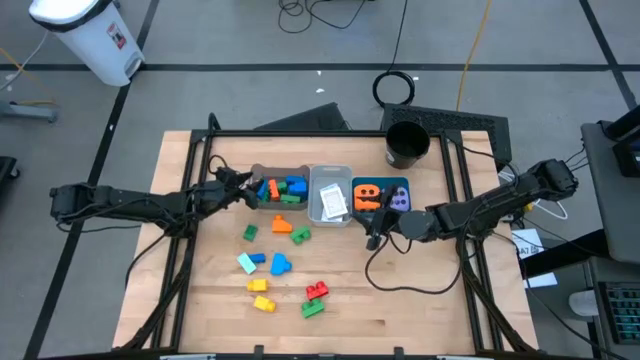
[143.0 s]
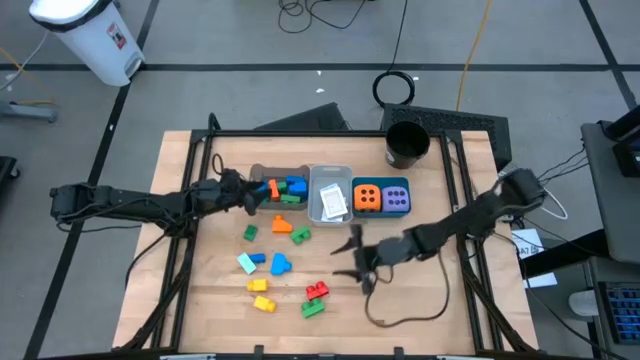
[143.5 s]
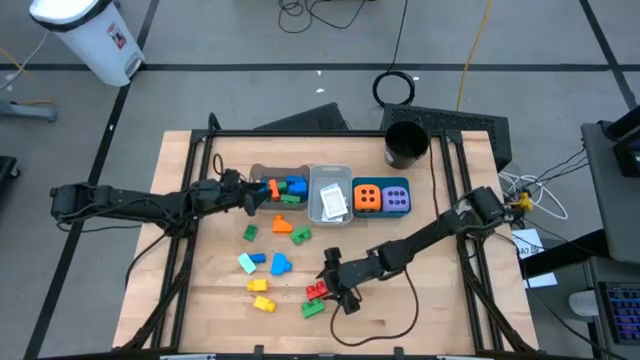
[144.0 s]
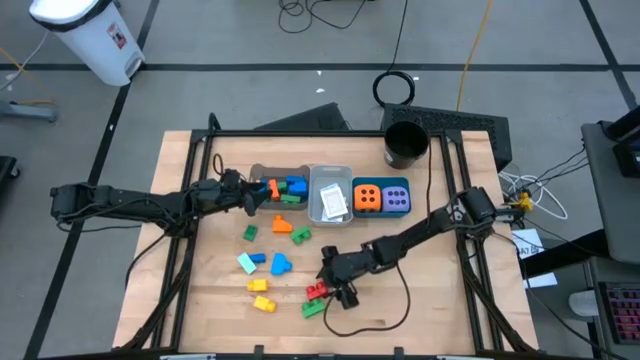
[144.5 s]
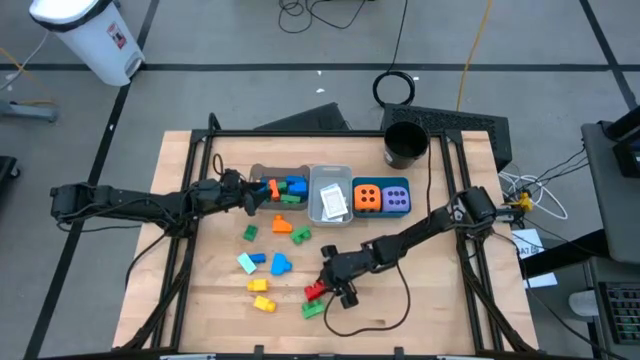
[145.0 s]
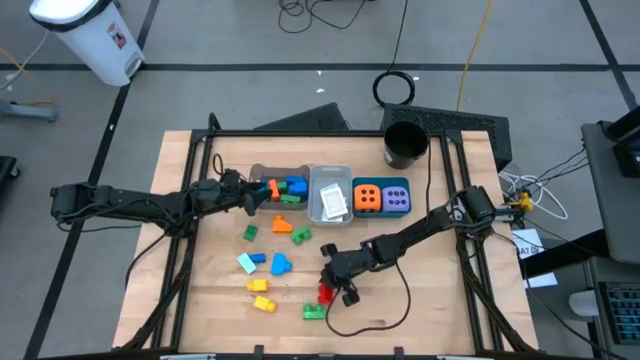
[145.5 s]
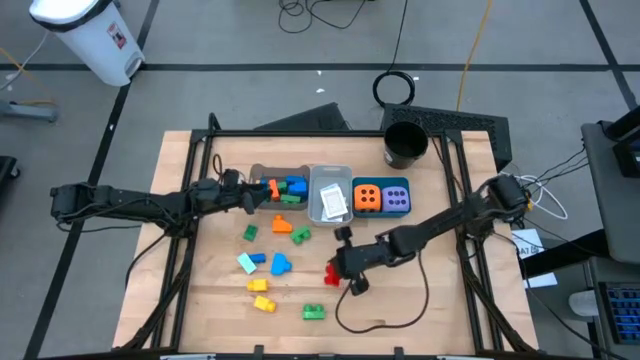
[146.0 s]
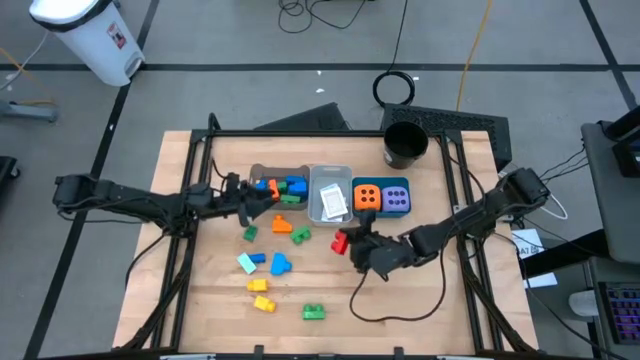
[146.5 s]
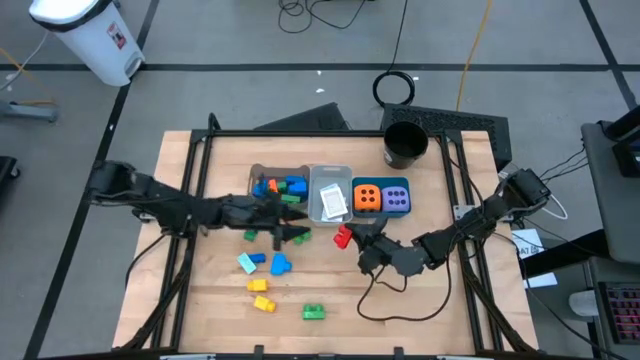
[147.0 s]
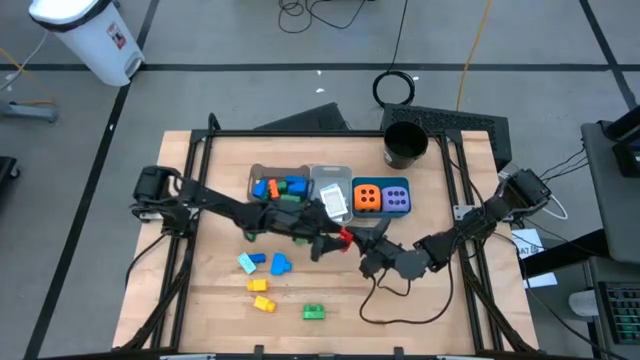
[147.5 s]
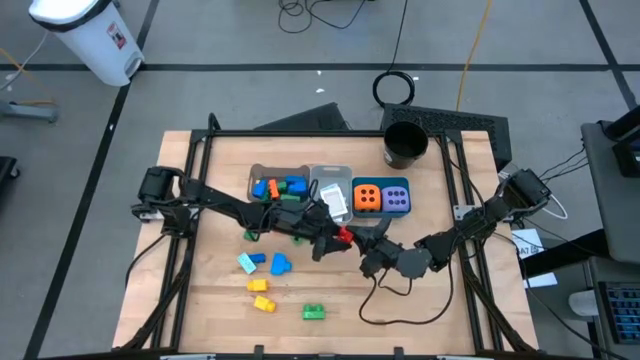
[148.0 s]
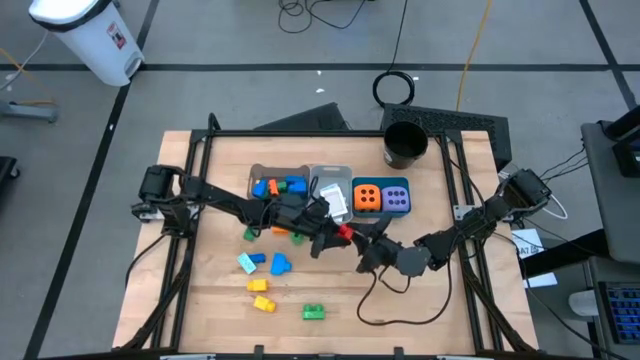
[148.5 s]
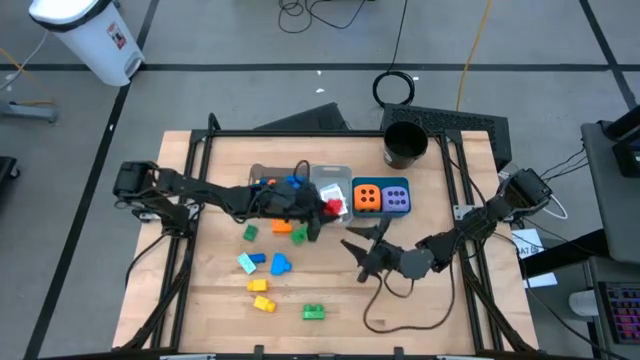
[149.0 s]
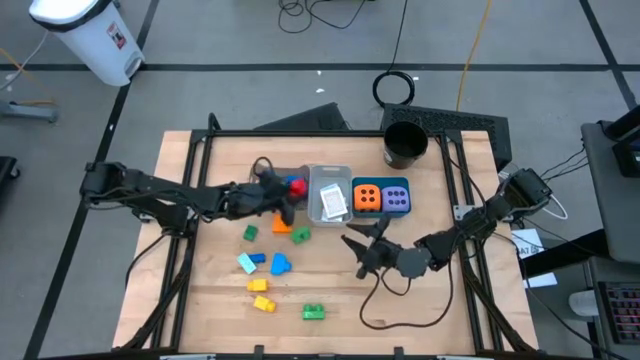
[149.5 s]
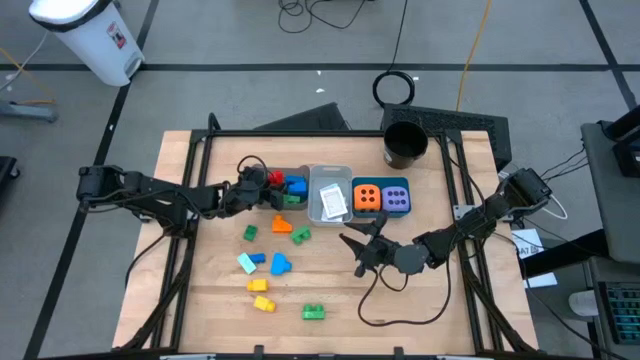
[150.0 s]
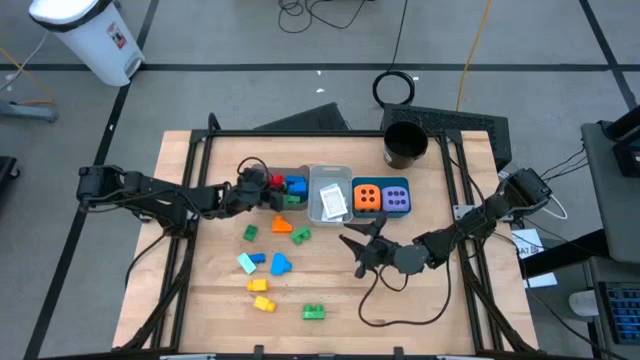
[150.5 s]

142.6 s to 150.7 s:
Task: Pick & Place Toys
Put the red game piece into the black bin

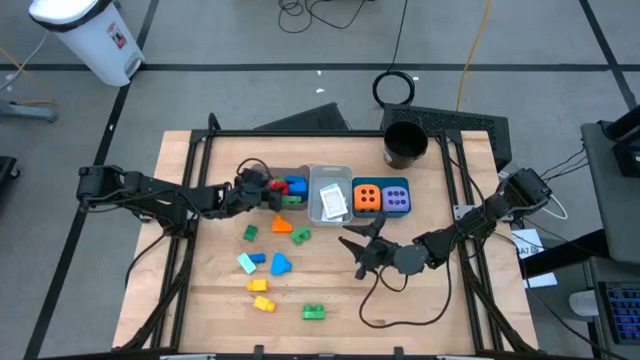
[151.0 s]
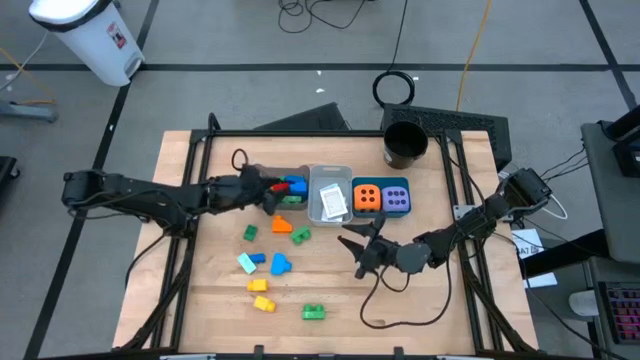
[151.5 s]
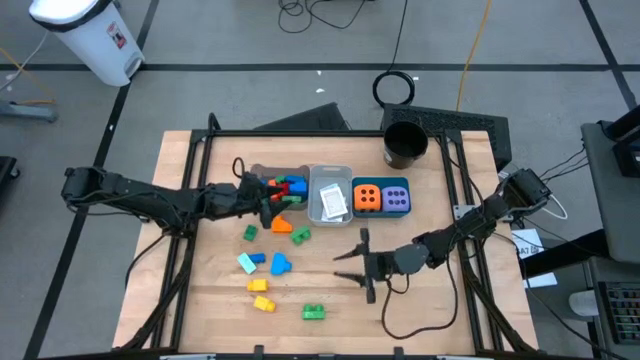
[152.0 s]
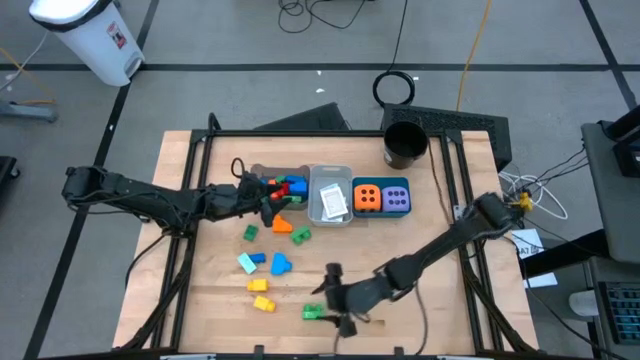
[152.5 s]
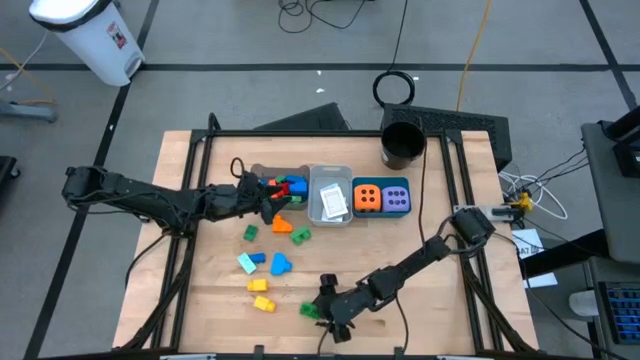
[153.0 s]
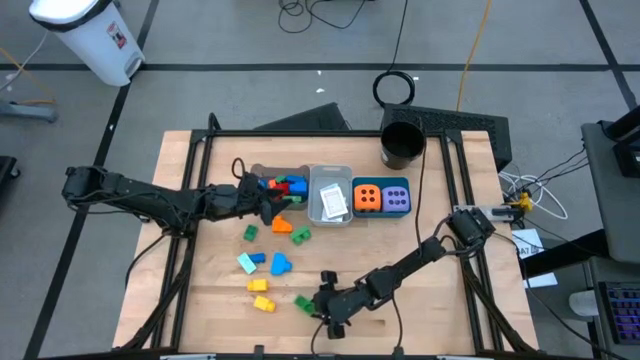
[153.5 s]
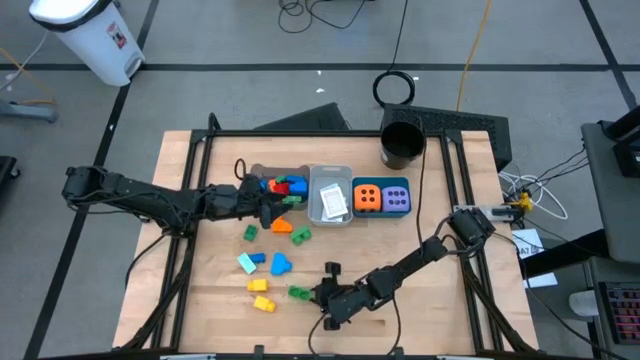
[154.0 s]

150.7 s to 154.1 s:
Put the green game piece into the black bin

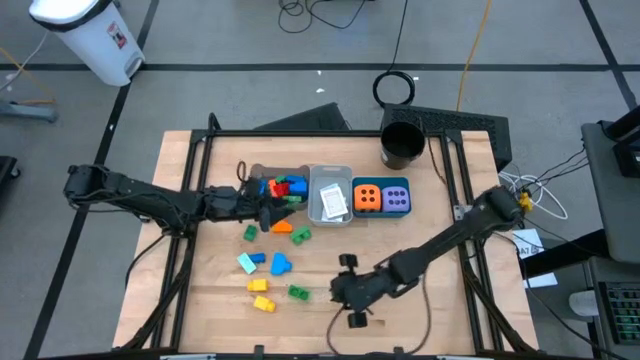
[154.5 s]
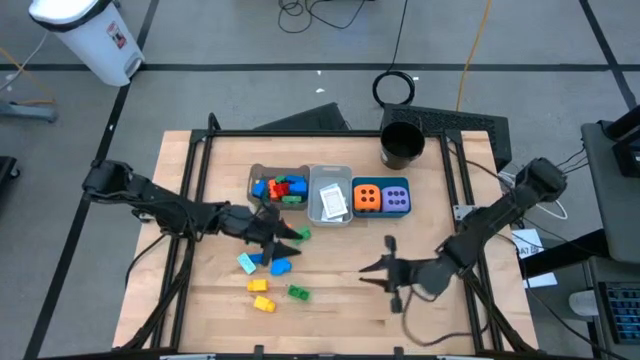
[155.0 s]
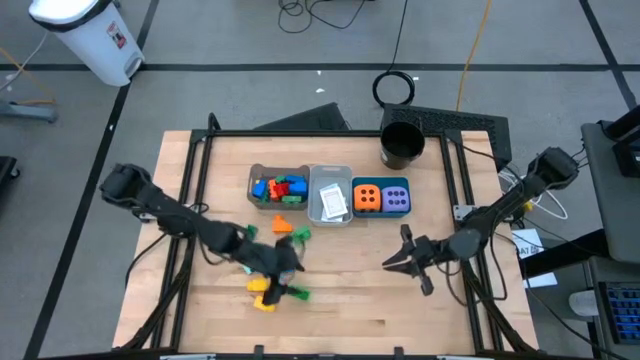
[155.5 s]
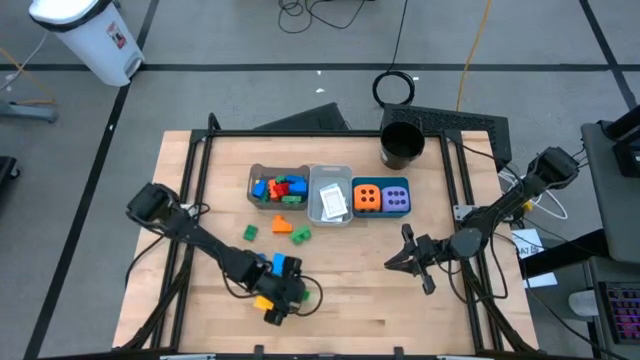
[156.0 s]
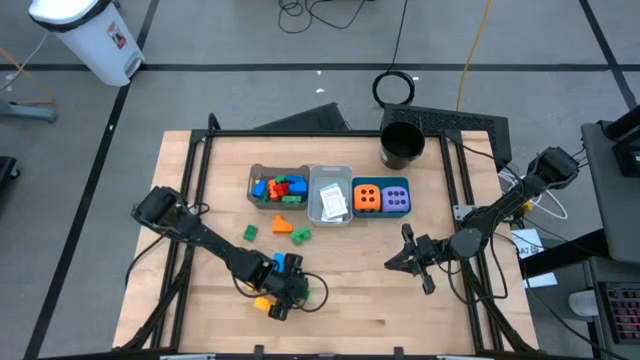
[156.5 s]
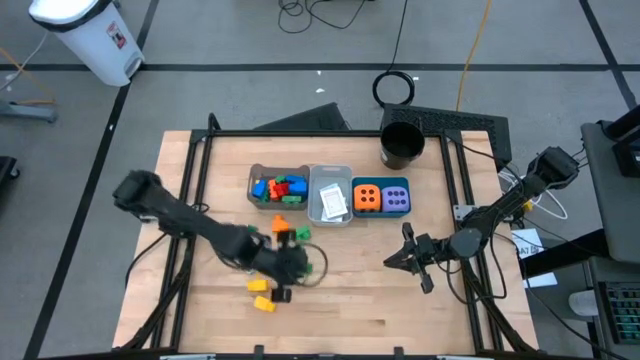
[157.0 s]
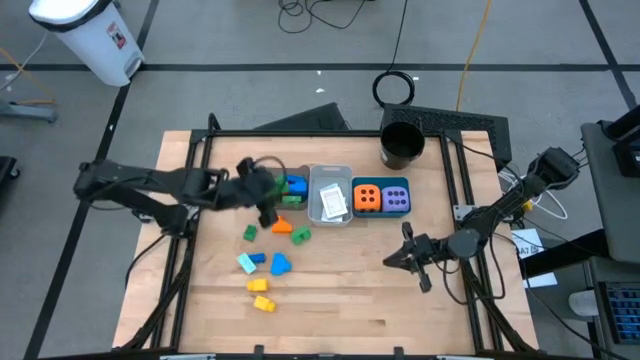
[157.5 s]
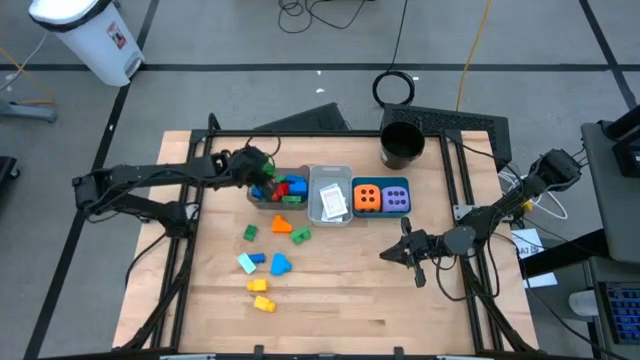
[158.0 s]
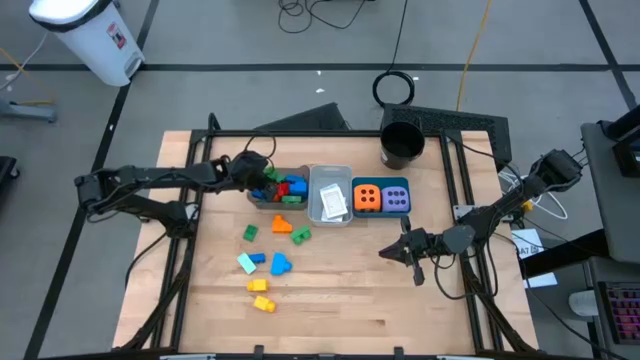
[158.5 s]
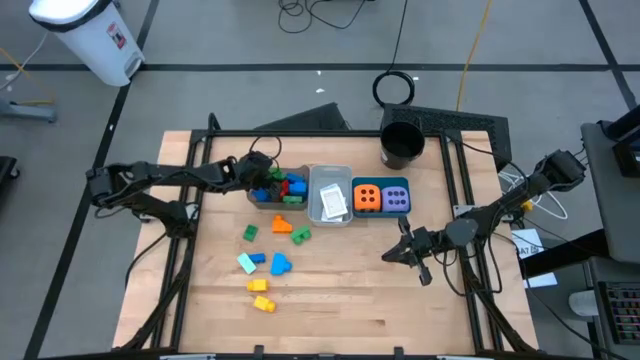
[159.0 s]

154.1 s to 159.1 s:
Put the green game piece into the black bin

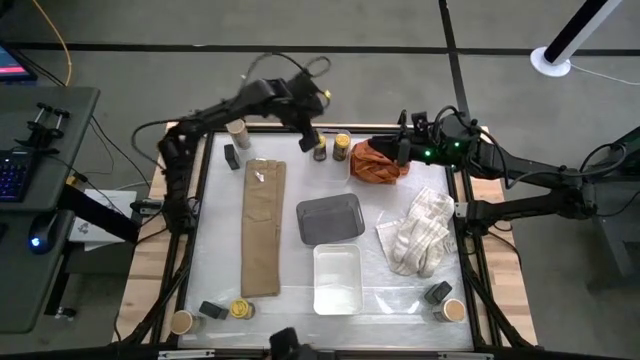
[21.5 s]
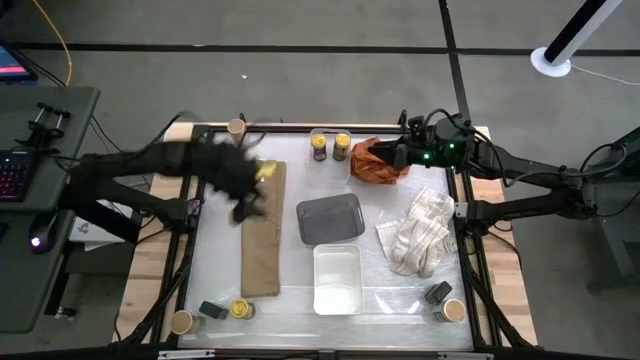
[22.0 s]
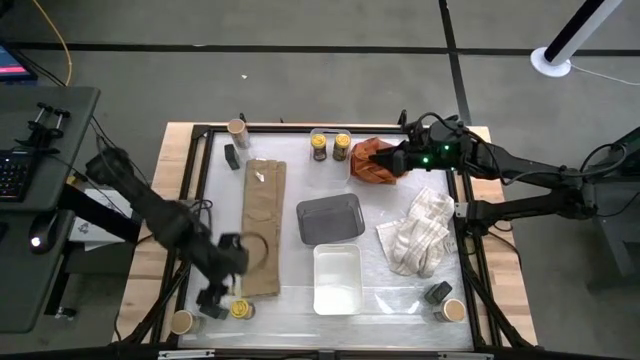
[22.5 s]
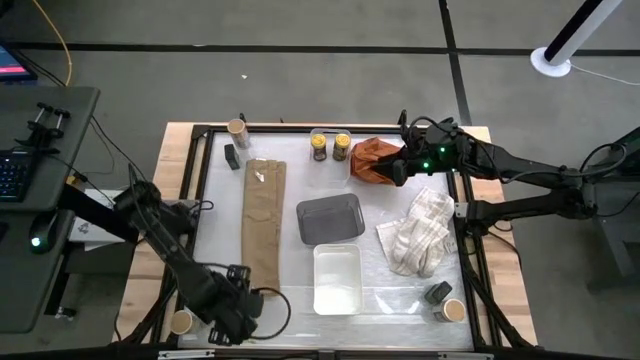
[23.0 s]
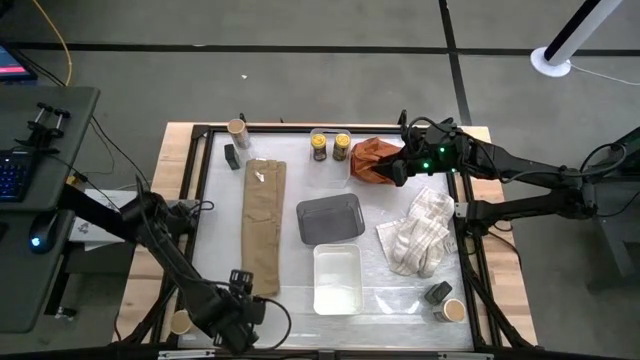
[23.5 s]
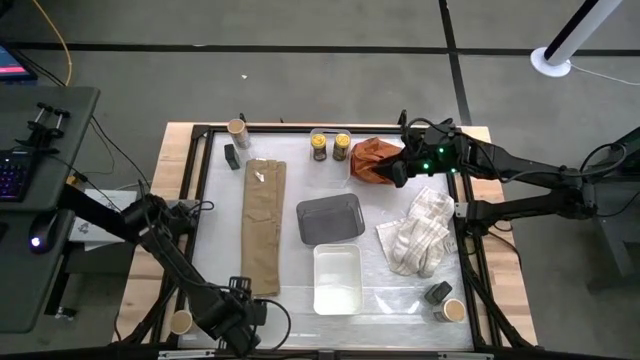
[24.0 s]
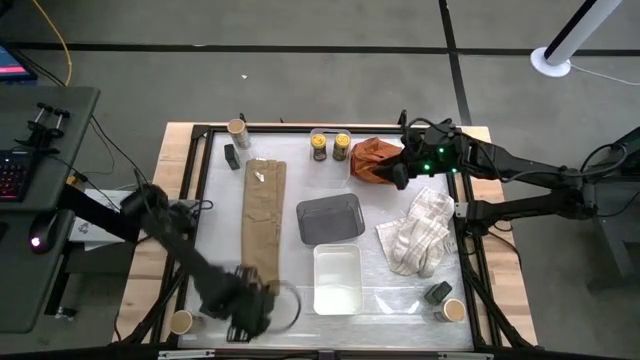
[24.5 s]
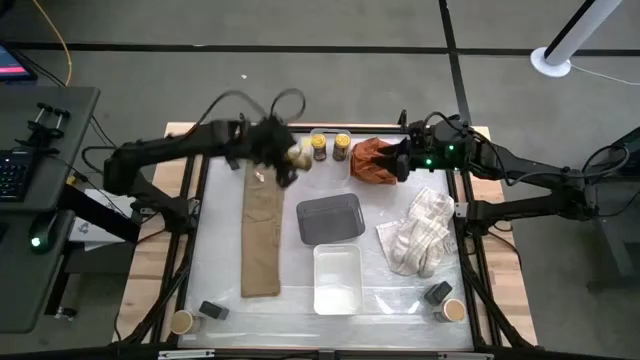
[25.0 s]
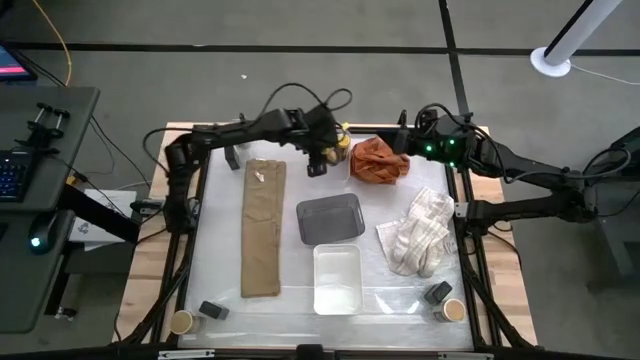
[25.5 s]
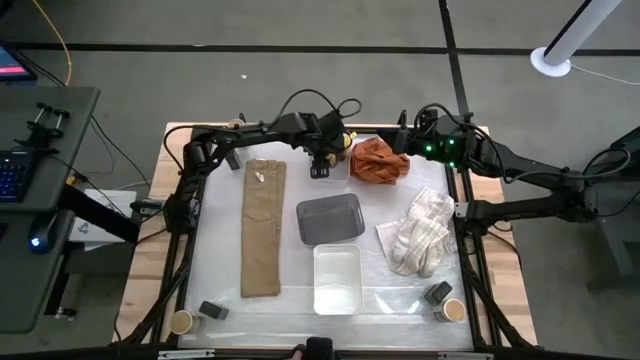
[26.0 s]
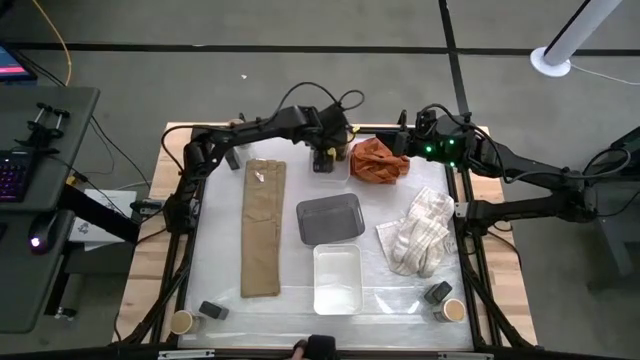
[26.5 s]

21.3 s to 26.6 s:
Task: Sort spices by type
Put the yellow seasoning bottle into the transparent bin
